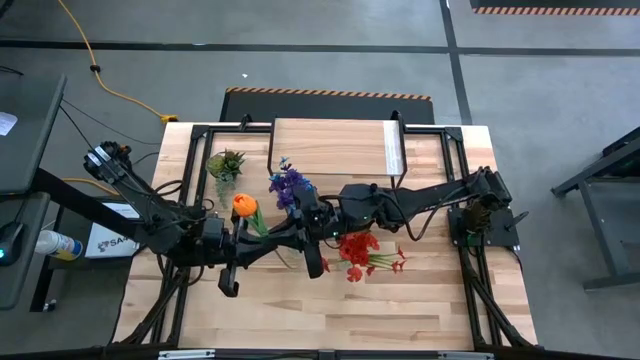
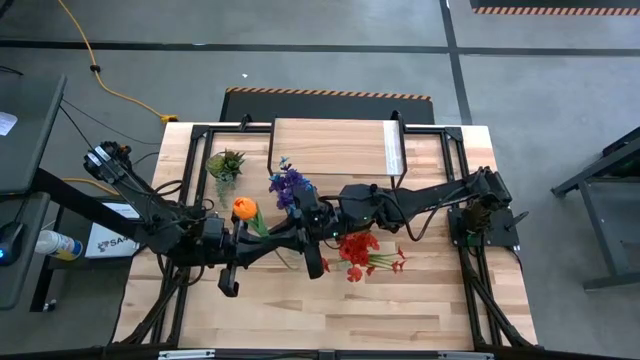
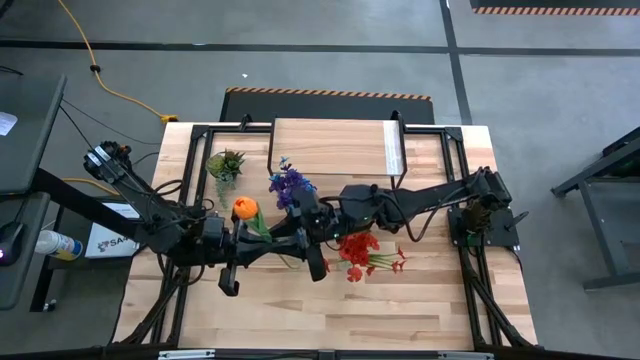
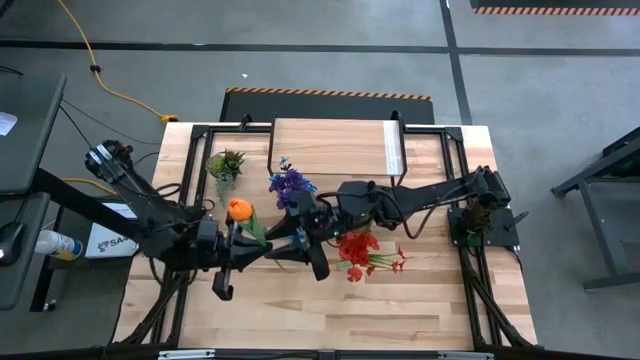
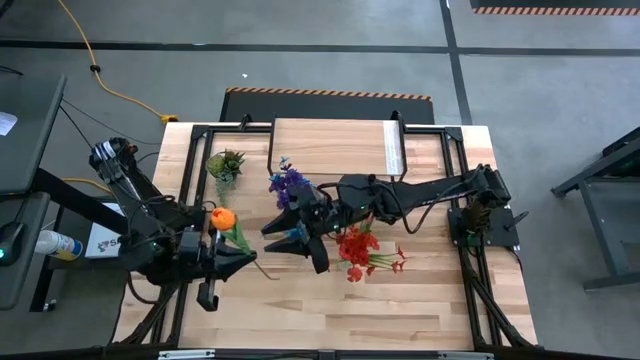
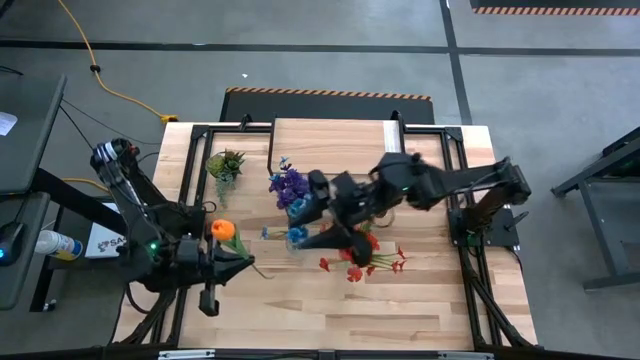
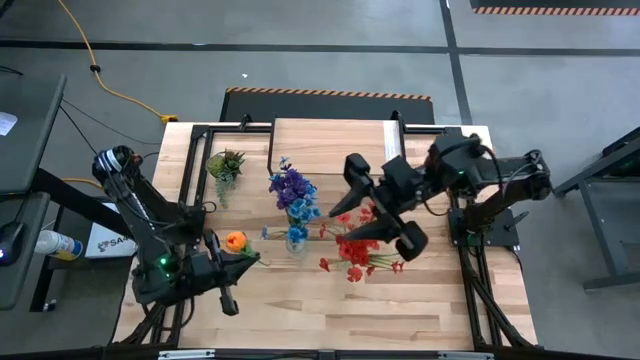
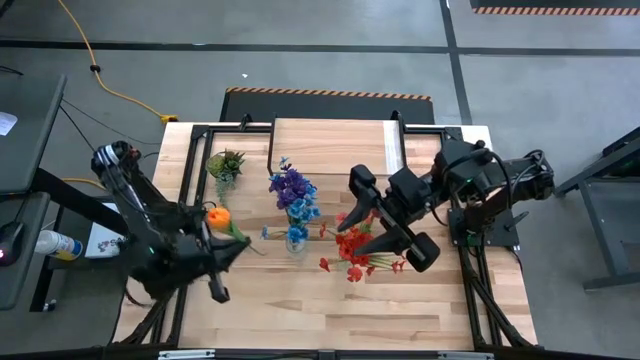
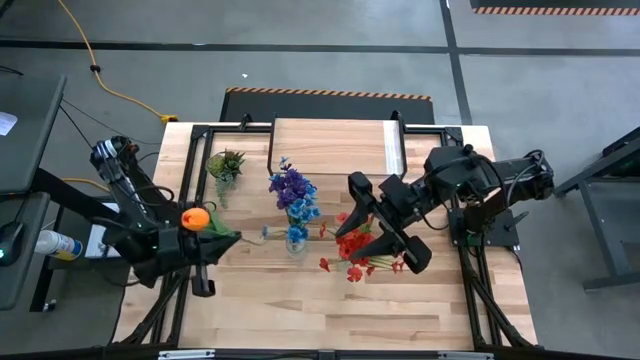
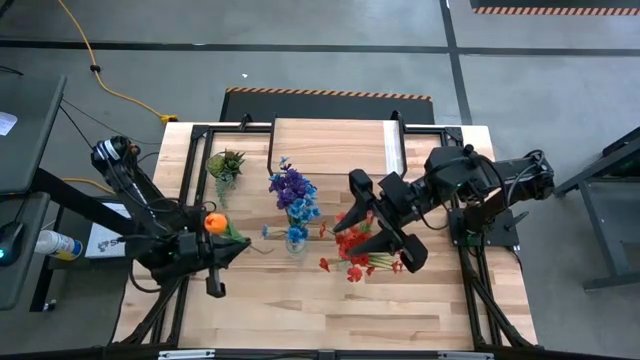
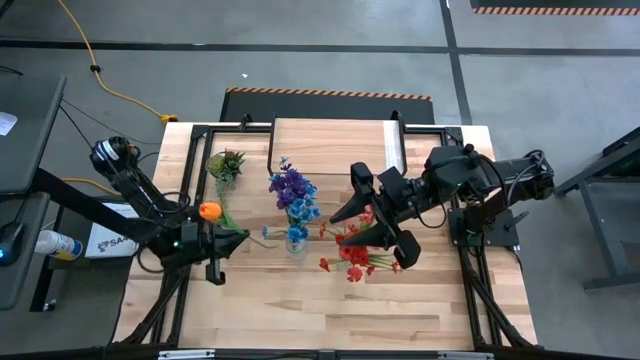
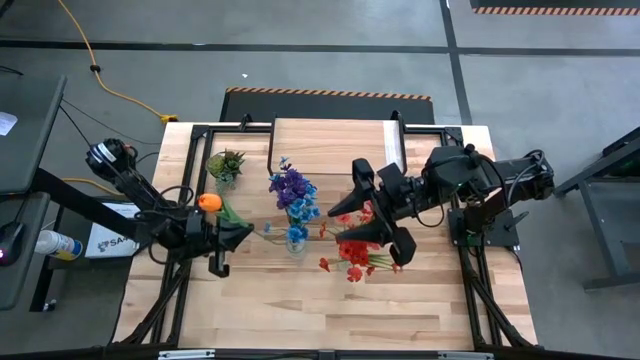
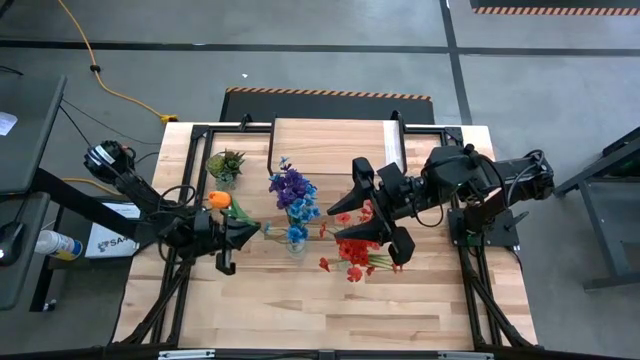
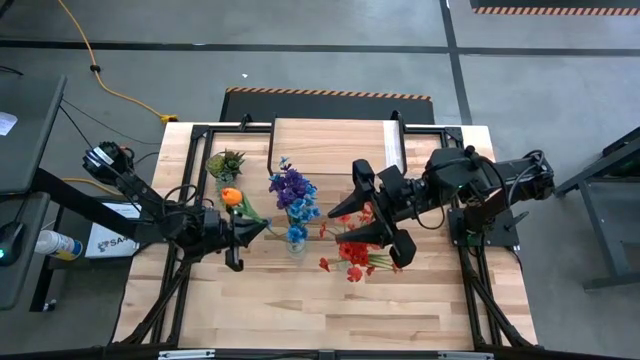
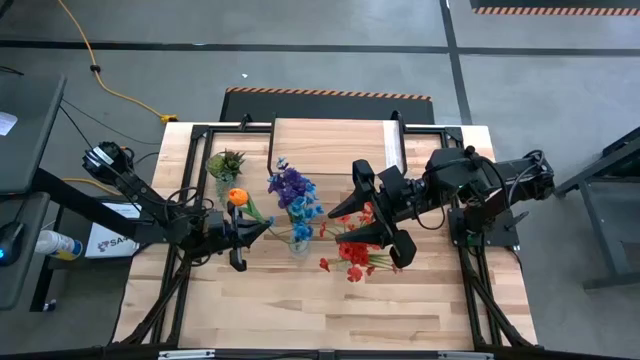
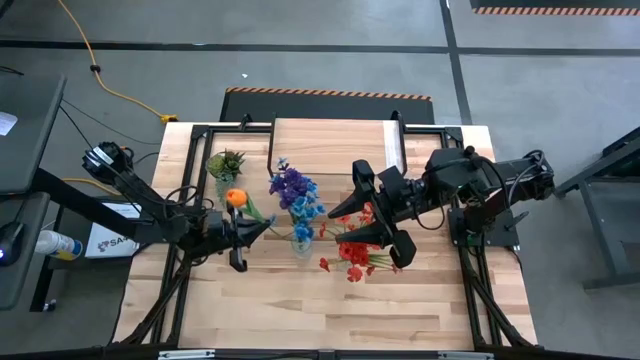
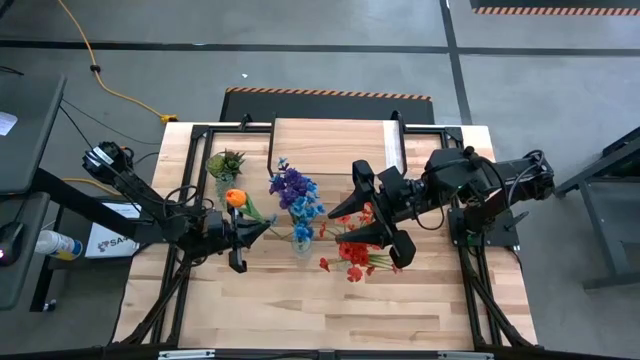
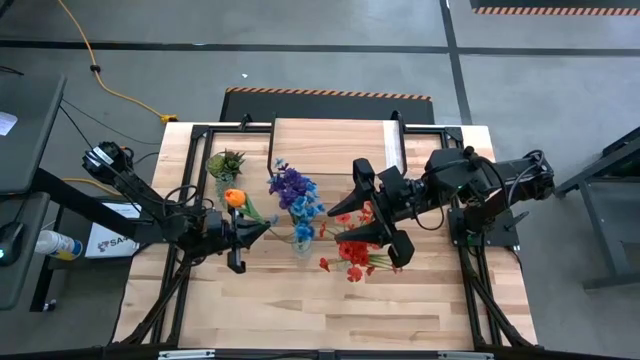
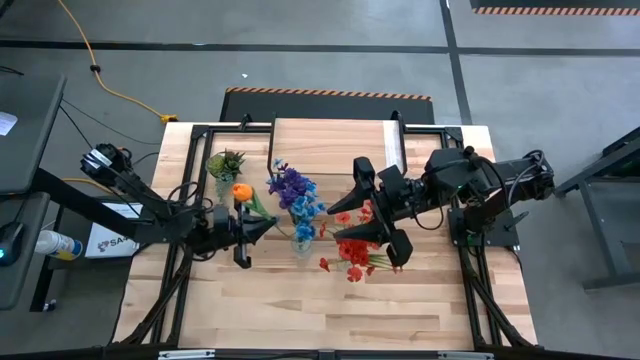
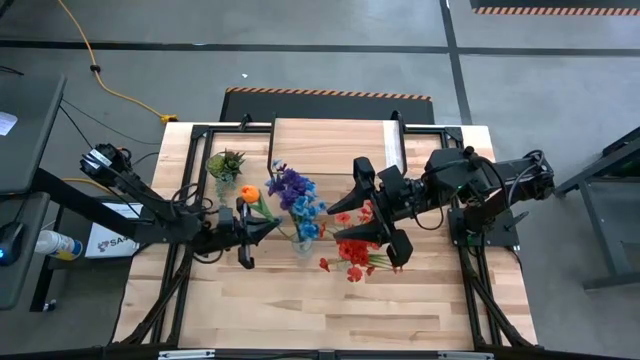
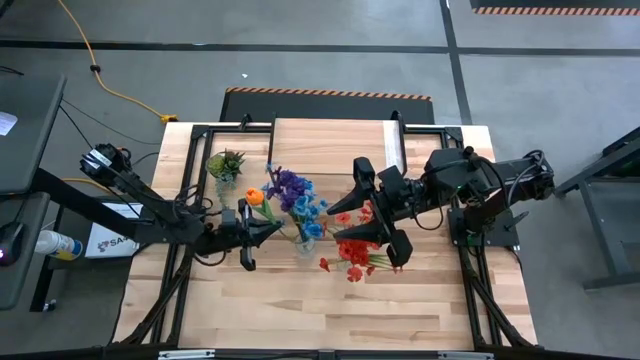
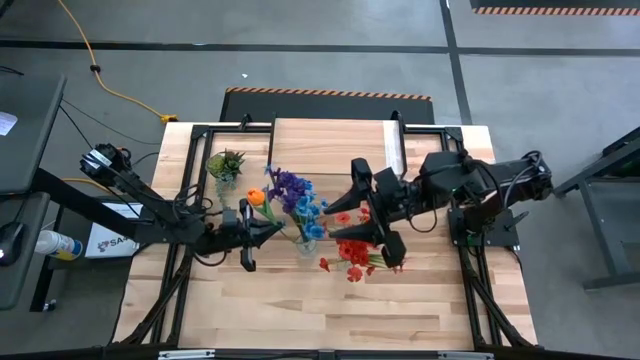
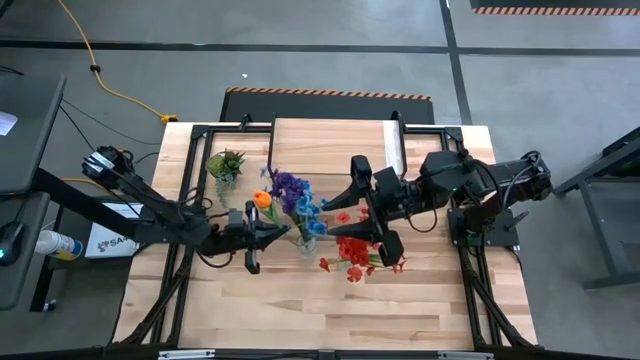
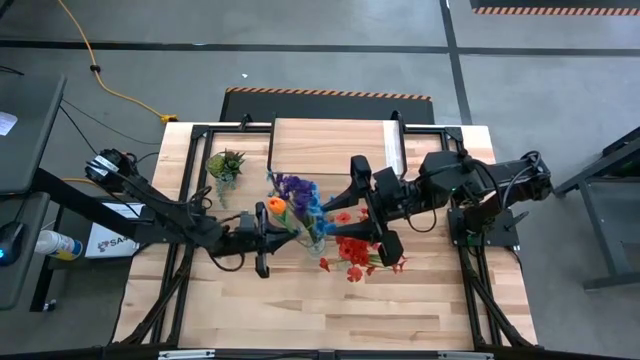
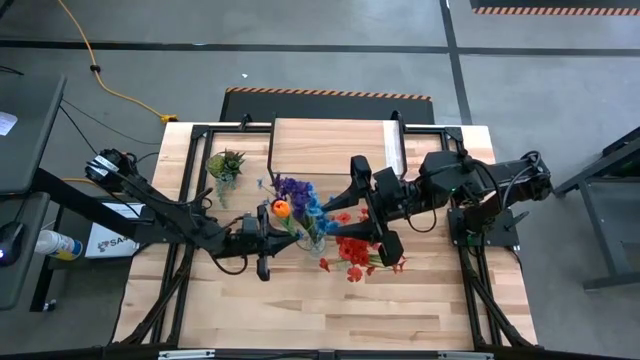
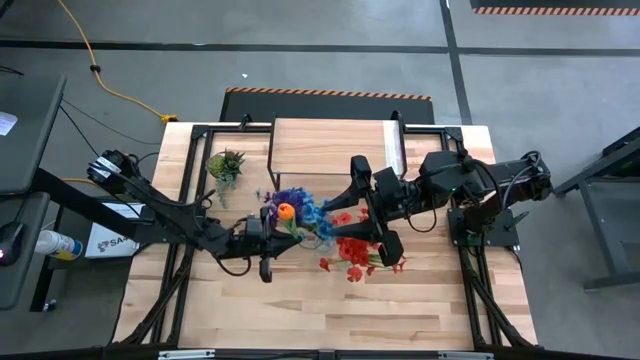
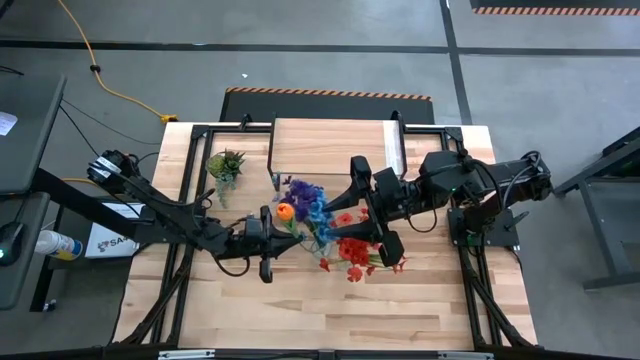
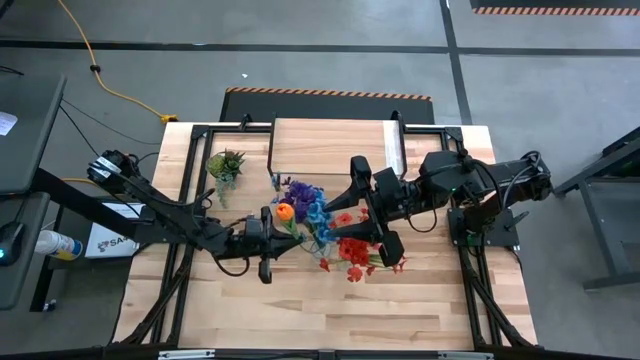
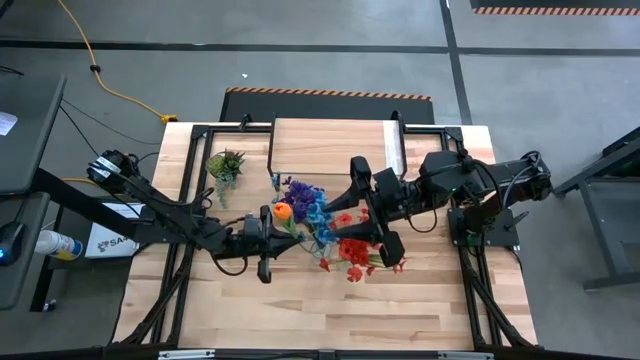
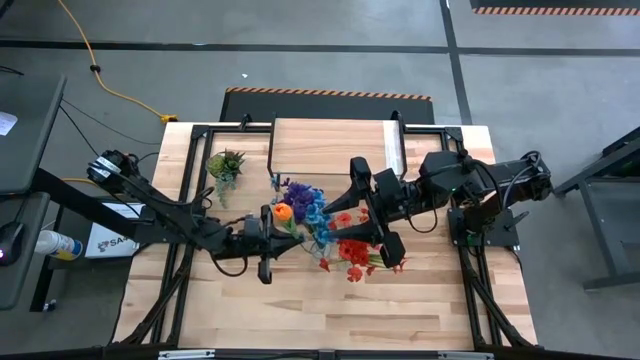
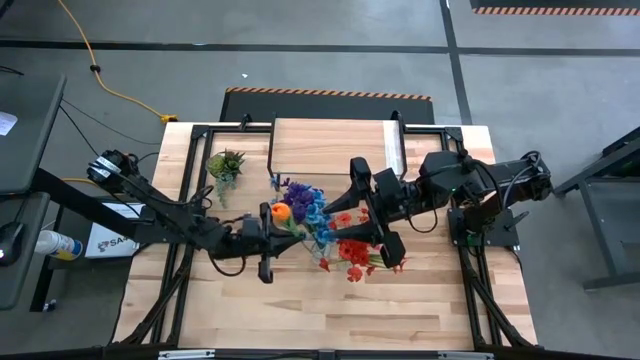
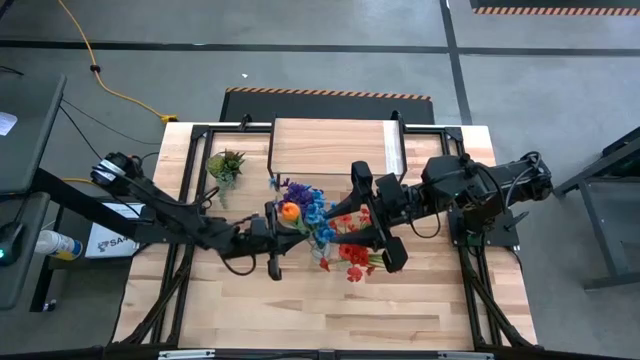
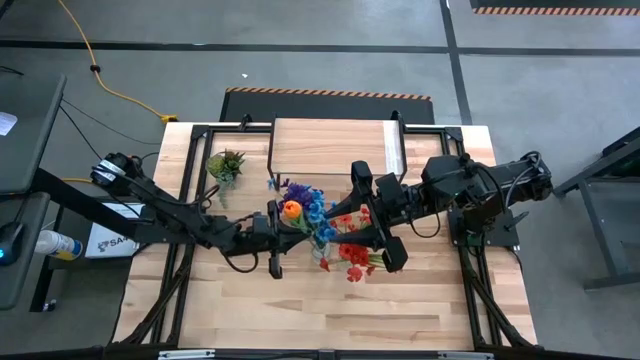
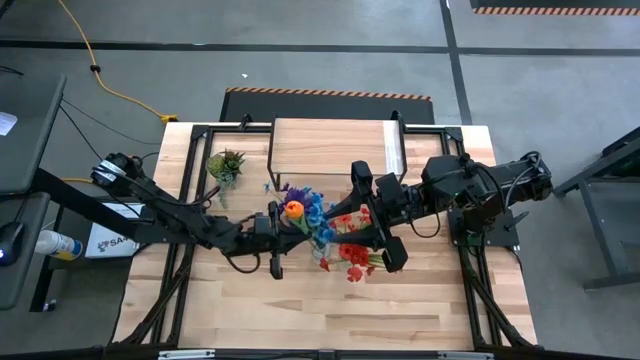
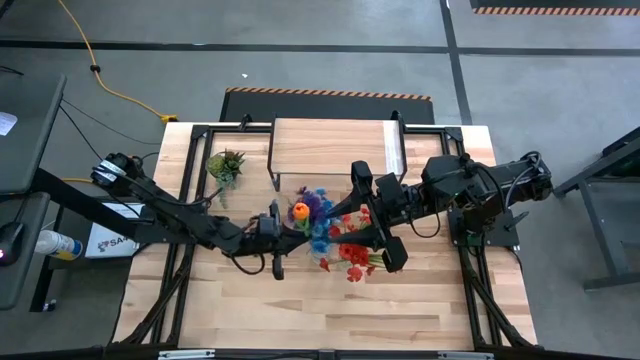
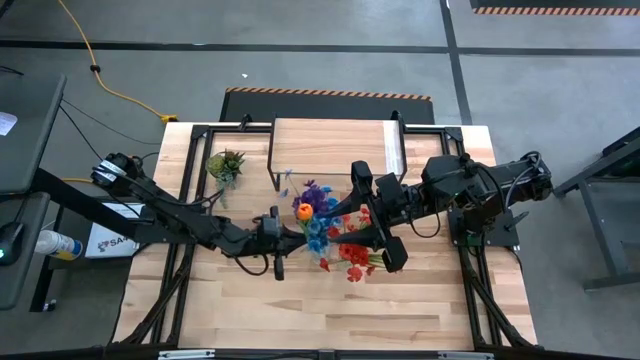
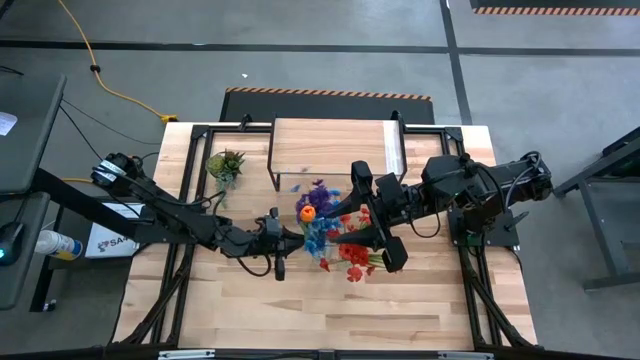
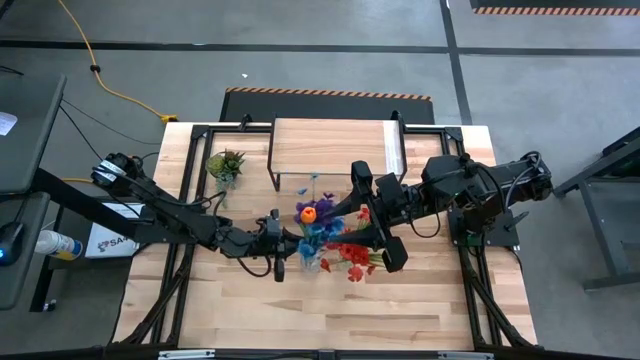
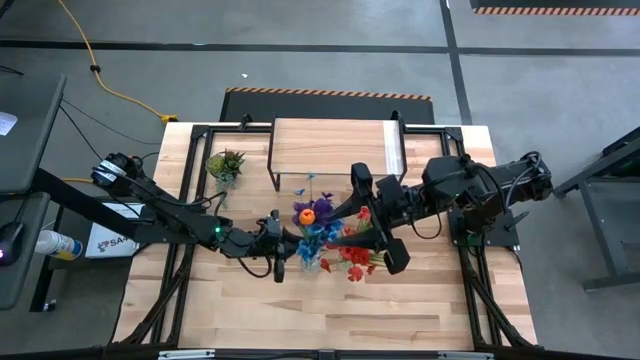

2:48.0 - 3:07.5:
Task: Pick and place flowers into a vace then onto a shelf
Put the orange tulip into the left transparent vase
